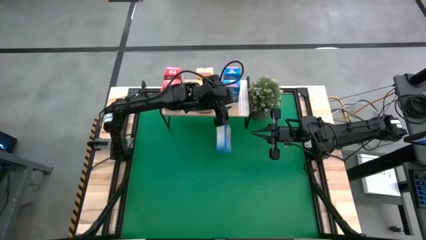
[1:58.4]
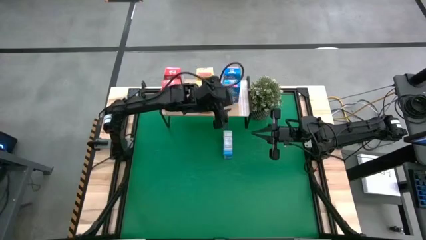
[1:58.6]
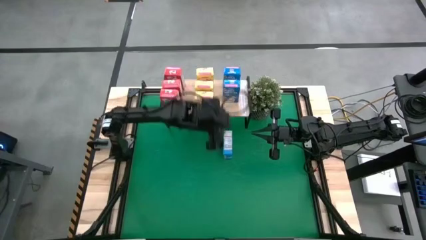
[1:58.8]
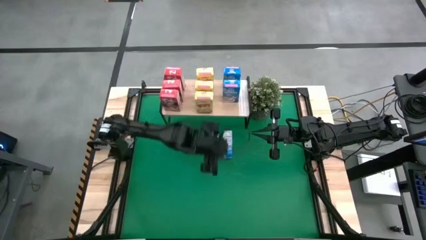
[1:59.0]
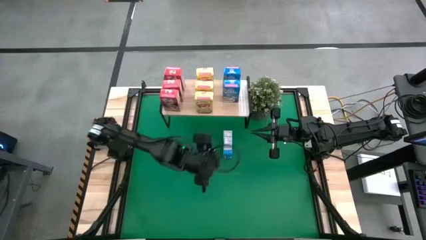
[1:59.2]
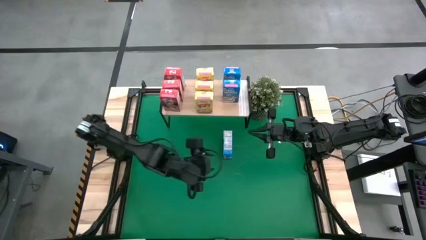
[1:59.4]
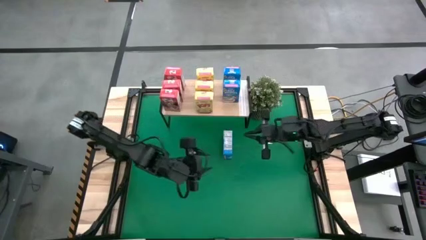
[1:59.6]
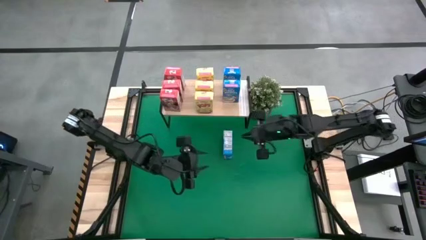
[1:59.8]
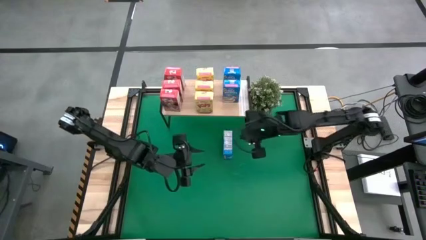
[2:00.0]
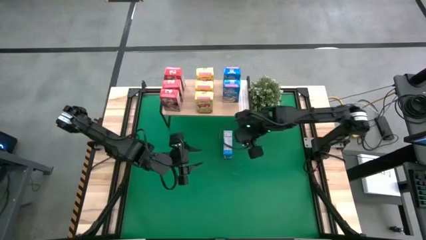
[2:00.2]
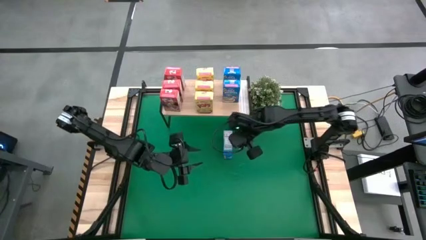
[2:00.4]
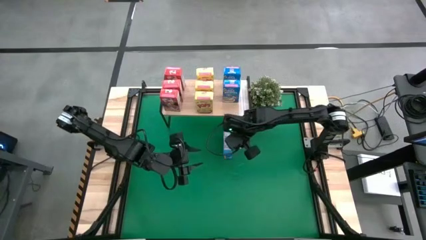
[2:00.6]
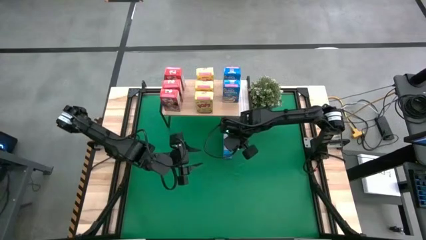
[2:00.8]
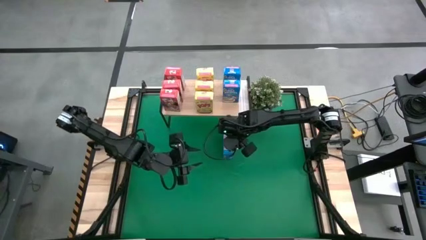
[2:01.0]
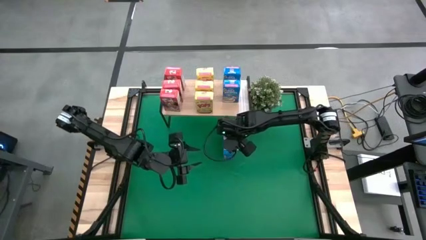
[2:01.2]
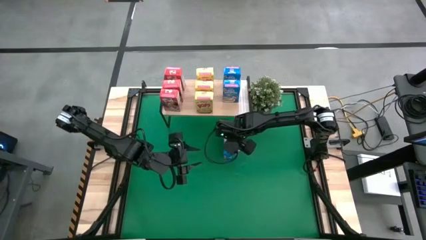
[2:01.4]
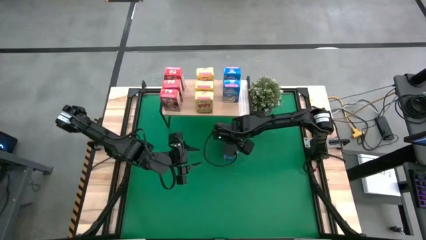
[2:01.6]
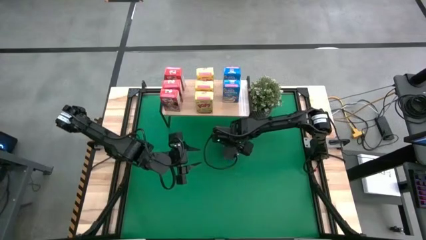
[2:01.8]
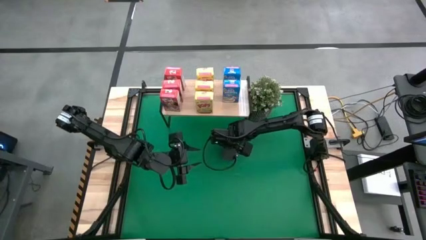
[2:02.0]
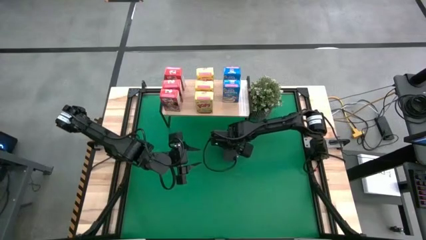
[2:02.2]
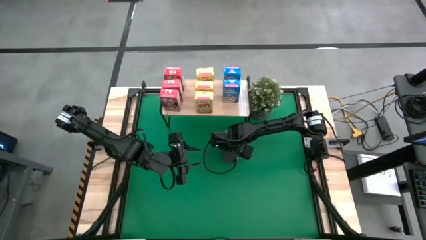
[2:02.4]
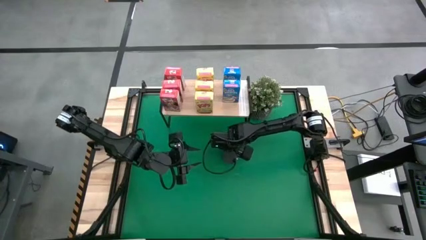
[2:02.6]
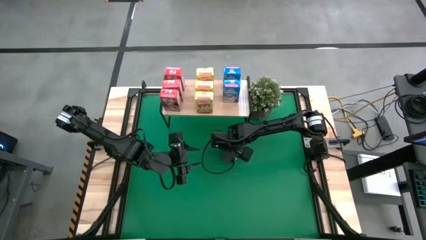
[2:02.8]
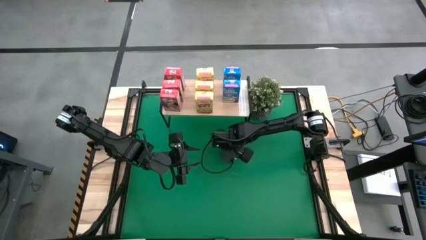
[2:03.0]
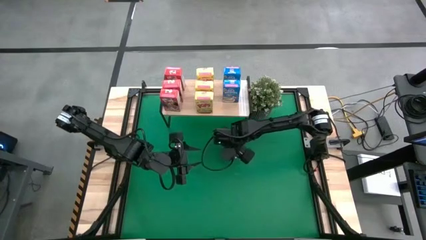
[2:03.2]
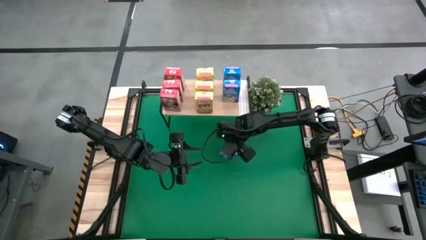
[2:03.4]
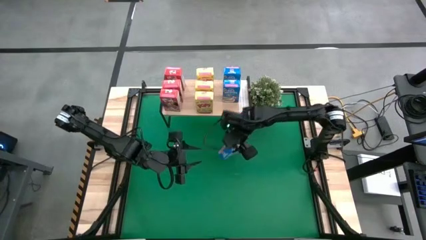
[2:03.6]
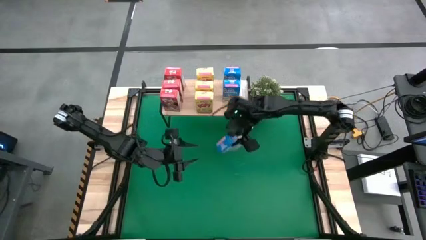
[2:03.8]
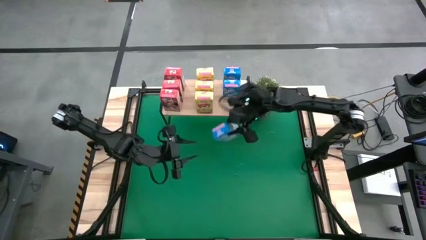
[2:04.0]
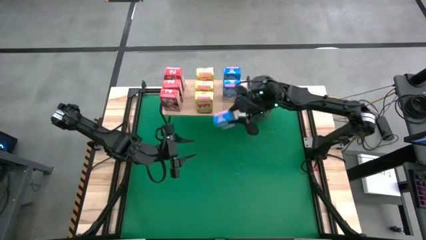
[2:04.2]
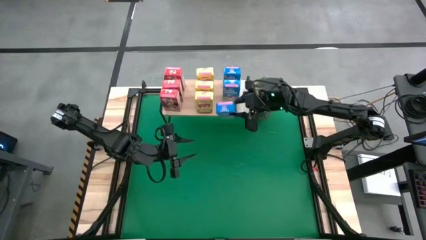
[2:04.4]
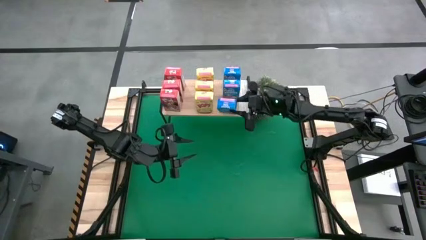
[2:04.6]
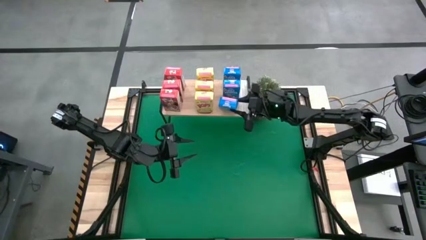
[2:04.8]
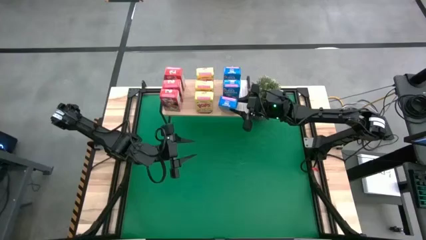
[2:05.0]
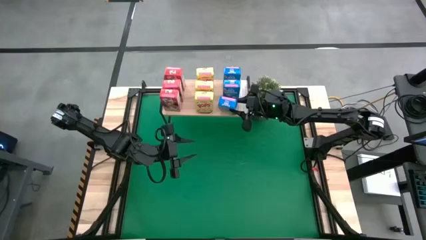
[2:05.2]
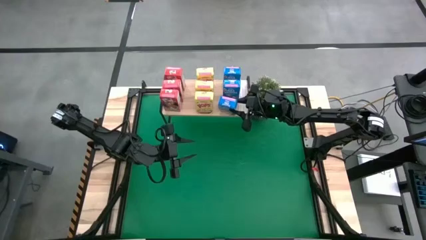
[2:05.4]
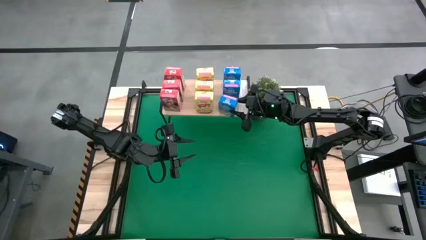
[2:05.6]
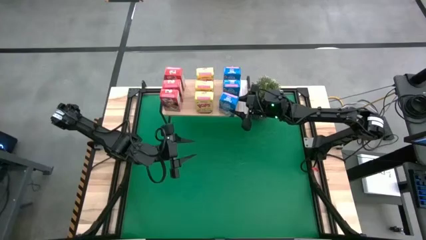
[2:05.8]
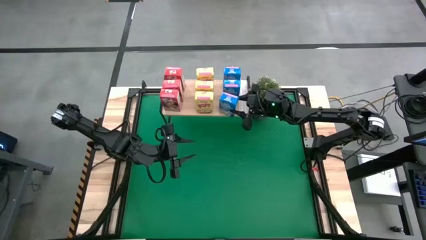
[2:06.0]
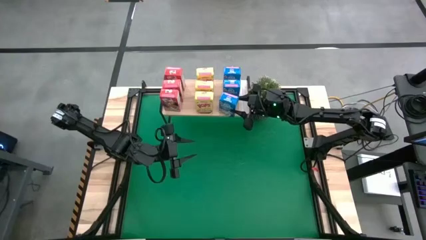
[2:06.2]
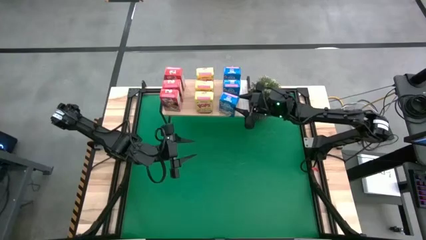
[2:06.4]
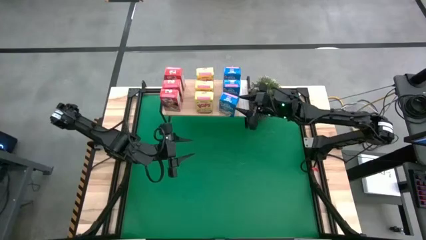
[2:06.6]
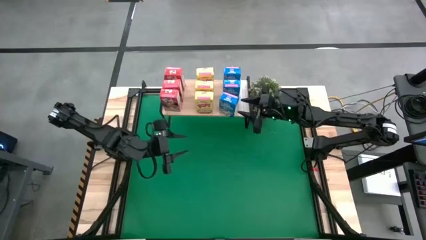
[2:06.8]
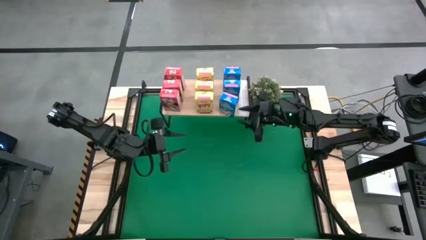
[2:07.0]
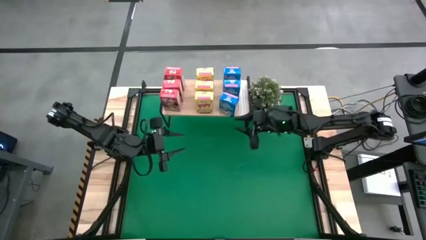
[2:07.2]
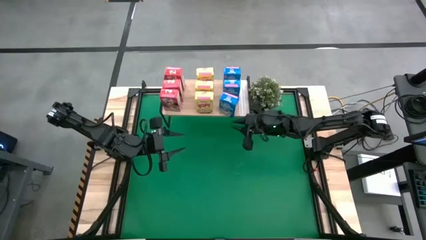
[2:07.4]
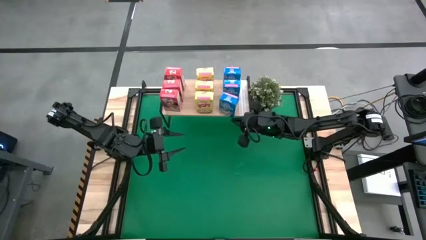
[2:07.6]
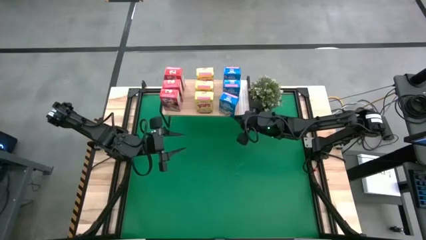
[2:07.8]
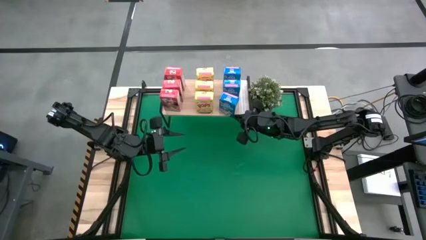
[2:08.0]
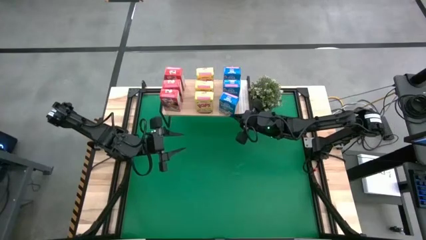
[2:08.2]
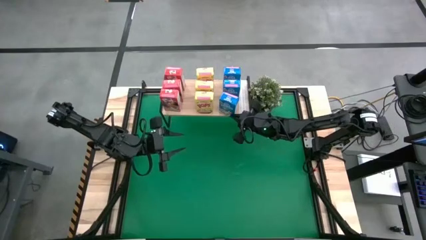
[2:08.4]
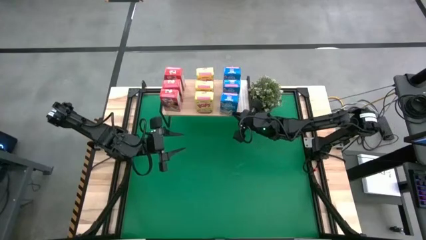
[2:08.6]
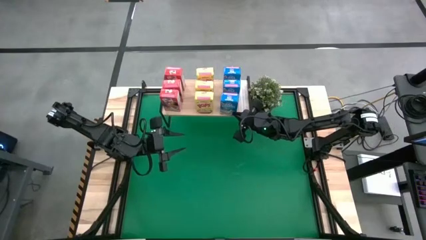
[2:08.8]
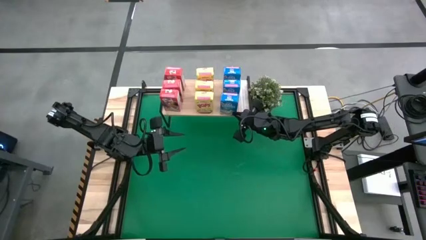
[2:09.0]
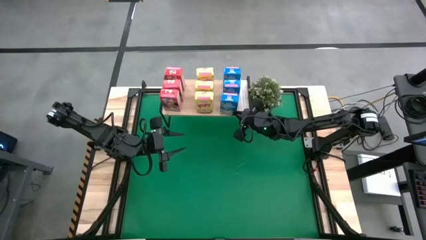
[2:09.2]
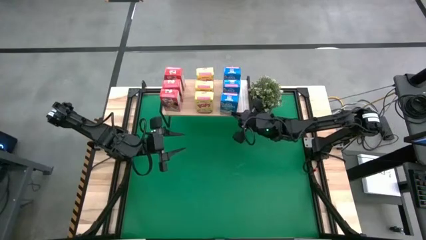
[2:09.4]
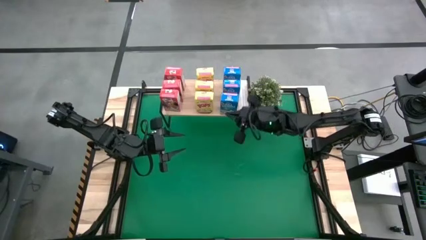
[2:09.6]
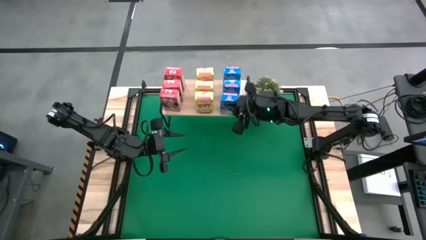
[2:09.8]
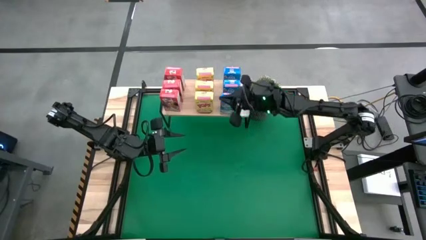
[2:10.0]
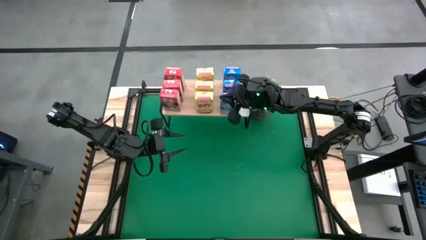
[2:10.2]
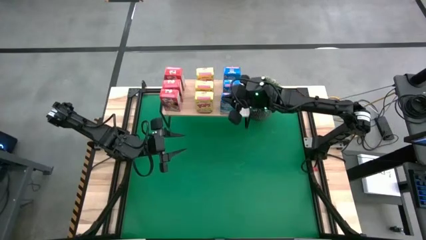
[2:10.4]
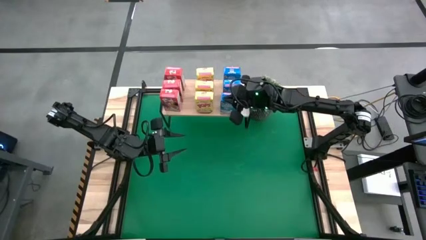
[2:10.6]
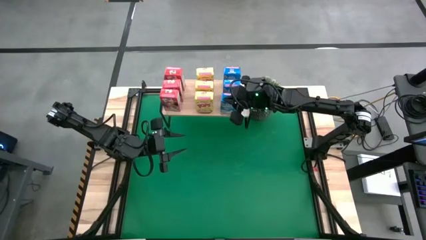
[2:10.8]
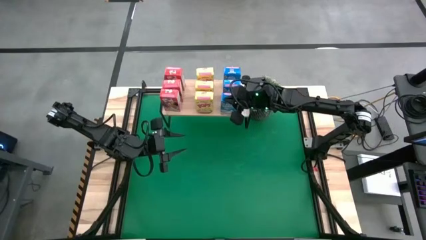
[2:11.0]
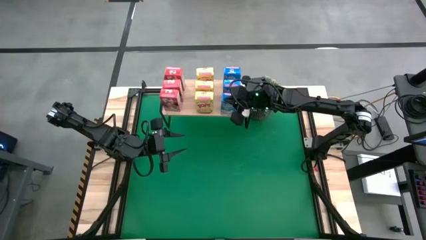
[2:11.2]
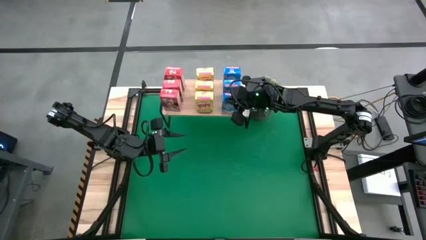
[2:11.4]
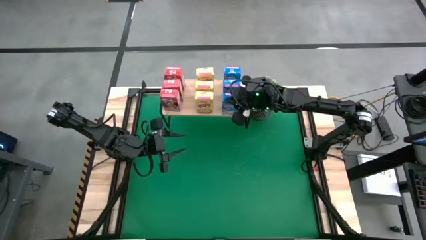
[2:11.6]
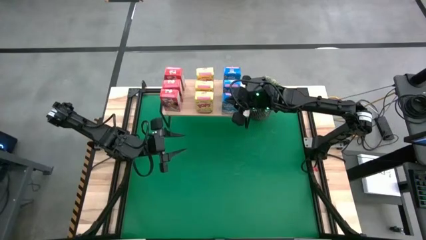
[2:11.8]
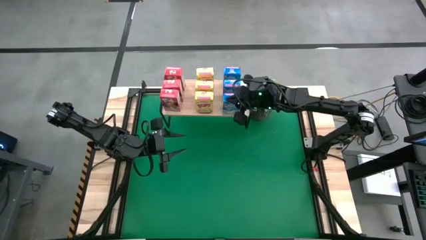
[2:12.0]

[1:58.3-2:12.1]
Task: Stack cereal on shelf
Put the blue cereal box on the shelf aligned with the other blue cereal boxes

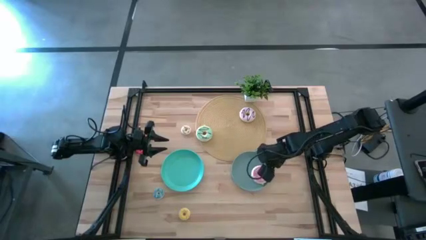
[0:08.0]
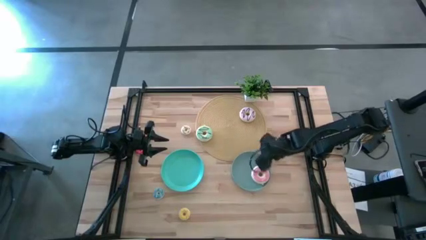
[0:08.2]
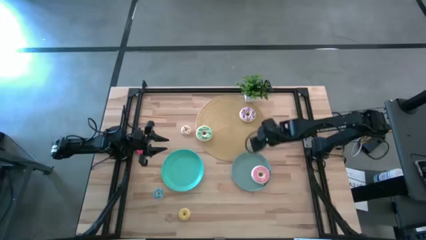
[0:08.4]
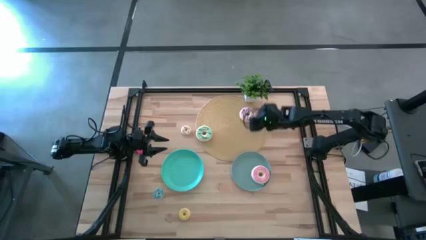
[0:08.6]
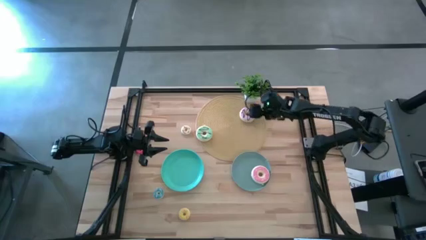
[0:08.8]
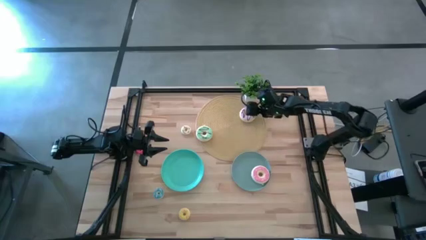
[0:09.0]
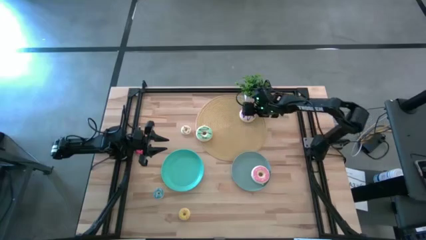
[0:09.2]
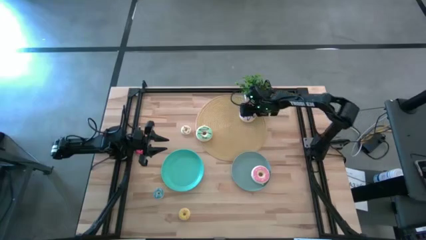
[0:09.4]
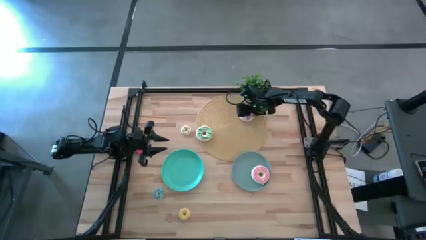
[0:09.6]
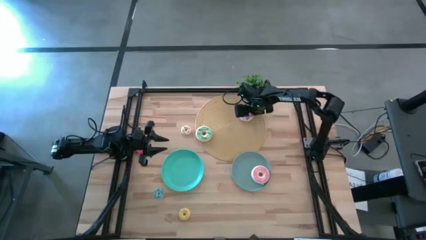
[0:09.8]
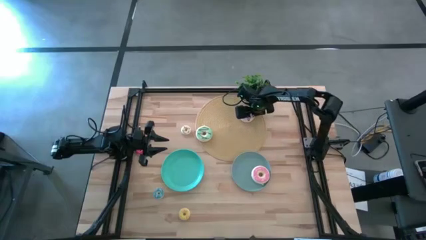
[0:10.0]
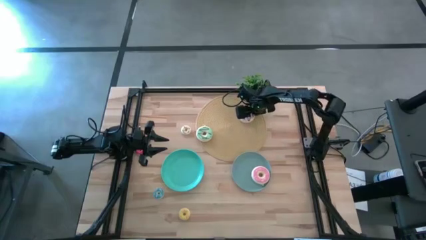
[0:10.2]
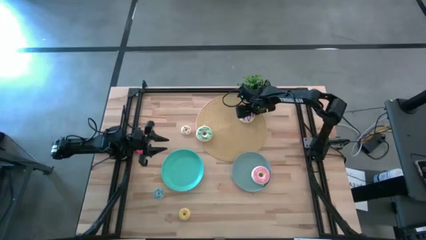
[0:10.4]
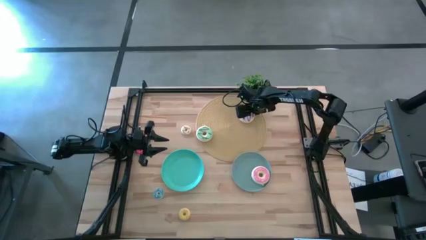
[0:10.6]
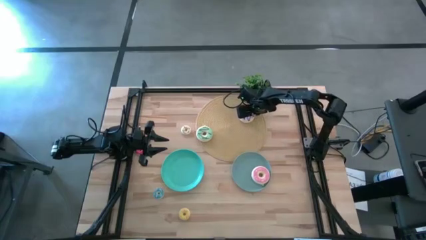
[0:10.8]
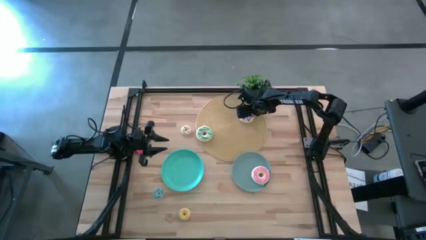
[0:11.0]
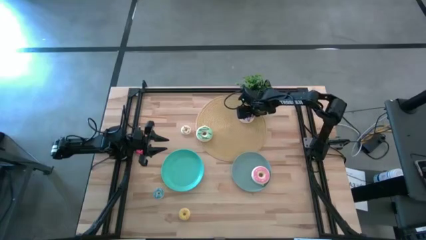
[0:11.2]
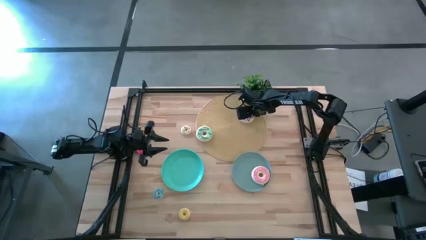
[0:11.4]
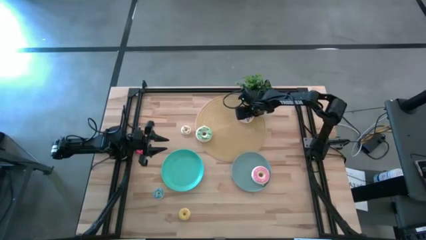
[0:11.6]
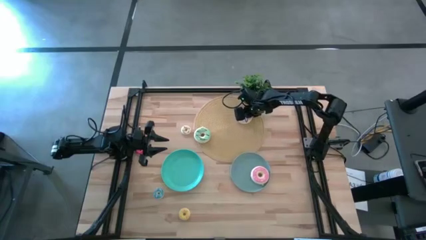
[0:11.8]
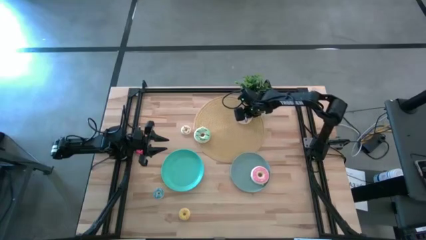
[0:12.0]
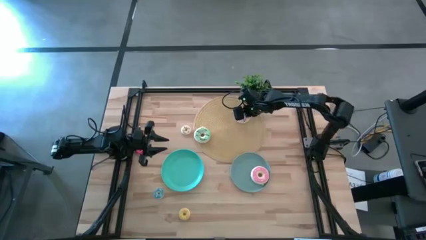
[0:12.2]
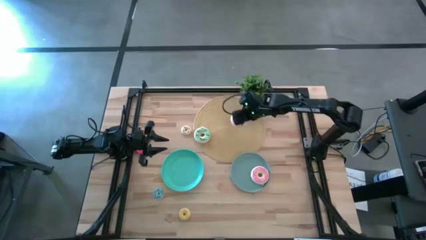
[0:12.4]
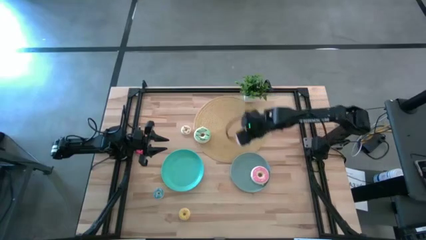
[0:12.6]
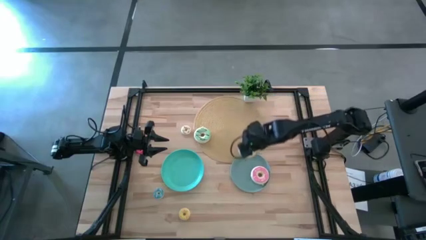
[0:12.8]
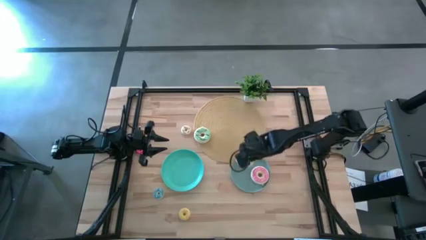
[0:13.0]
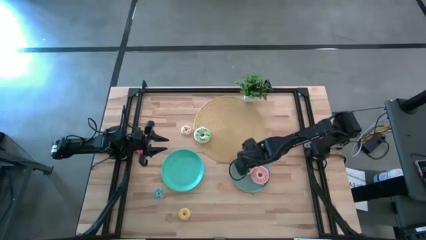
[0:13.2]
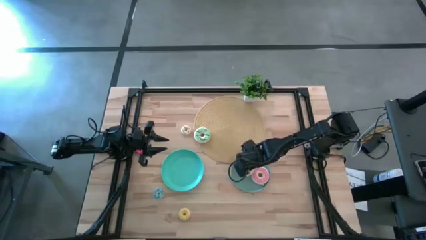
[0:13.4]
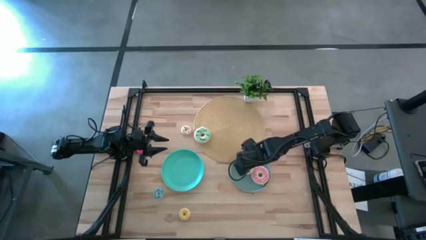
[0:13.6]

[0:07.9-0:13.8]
Task: Pick & Place donuts
Put the large purple donut on the gray plate
